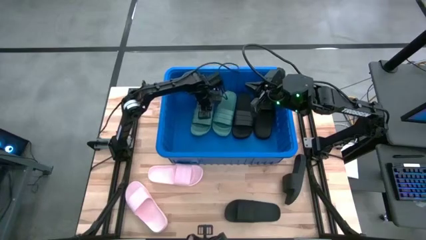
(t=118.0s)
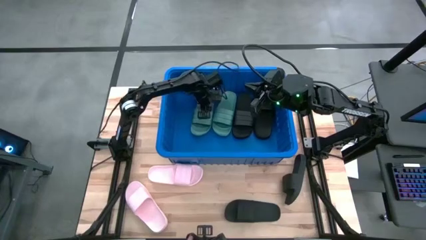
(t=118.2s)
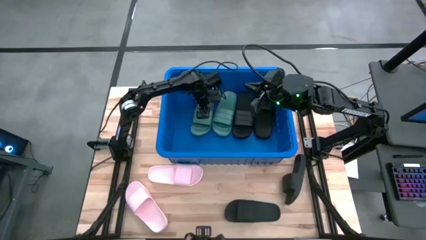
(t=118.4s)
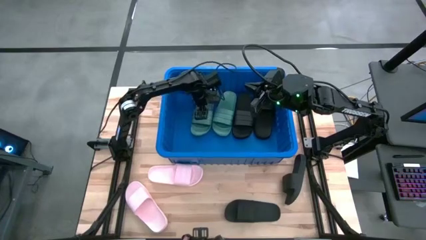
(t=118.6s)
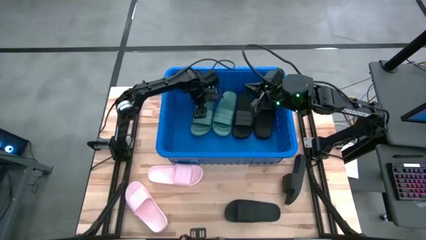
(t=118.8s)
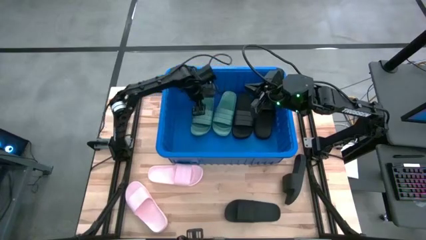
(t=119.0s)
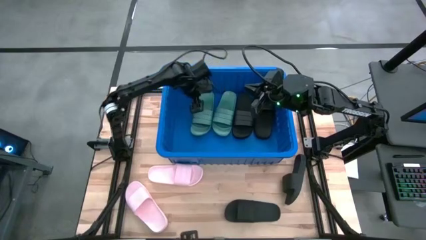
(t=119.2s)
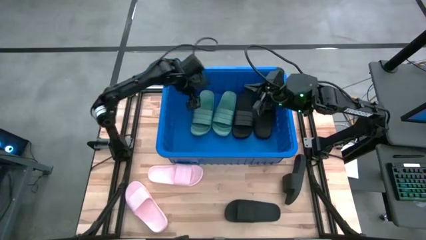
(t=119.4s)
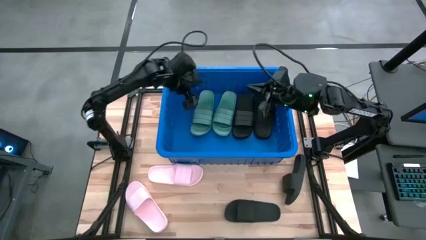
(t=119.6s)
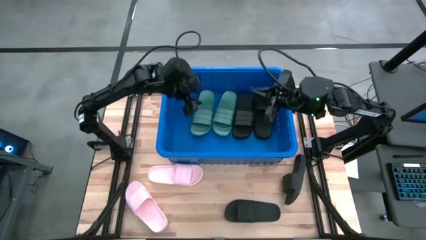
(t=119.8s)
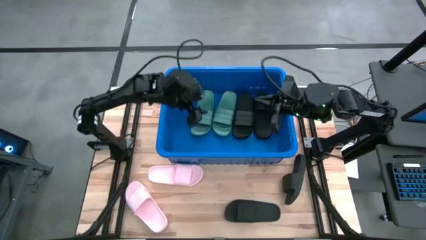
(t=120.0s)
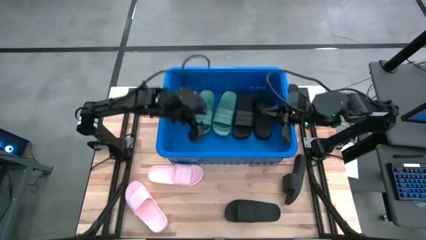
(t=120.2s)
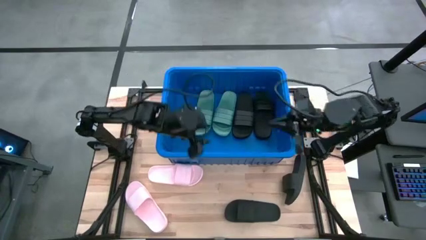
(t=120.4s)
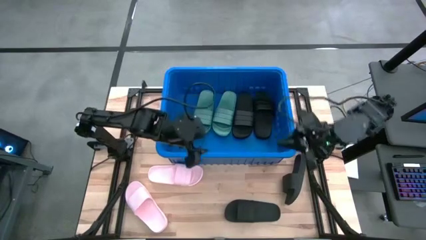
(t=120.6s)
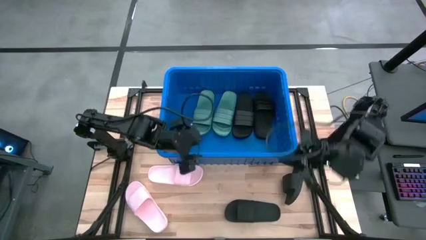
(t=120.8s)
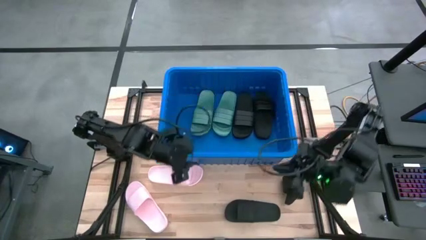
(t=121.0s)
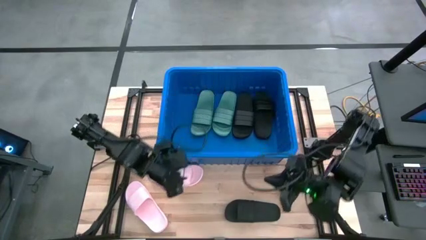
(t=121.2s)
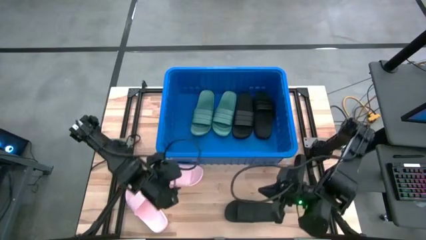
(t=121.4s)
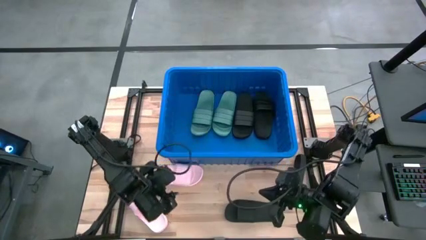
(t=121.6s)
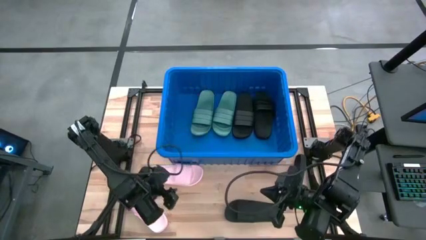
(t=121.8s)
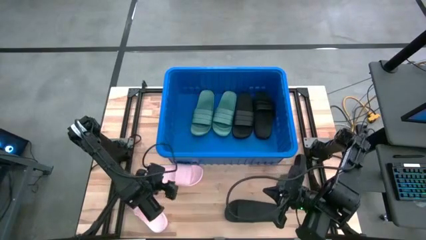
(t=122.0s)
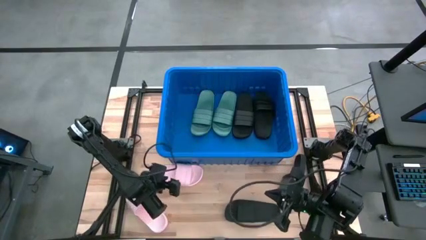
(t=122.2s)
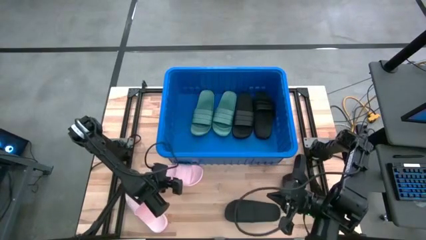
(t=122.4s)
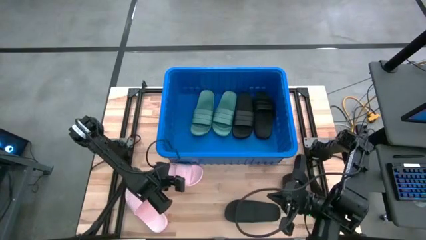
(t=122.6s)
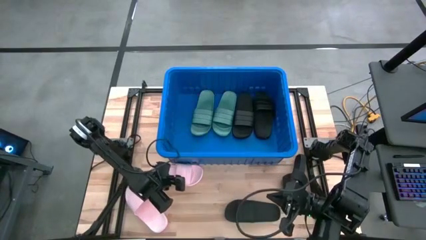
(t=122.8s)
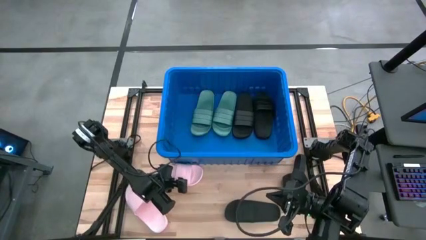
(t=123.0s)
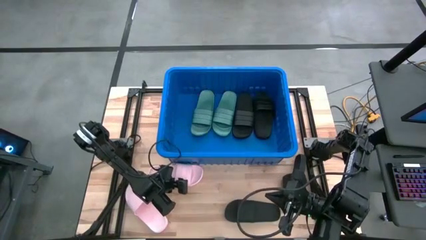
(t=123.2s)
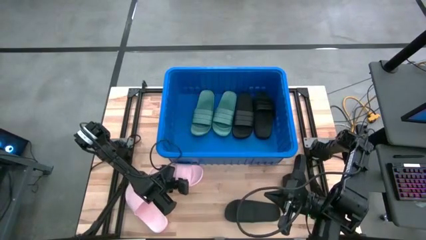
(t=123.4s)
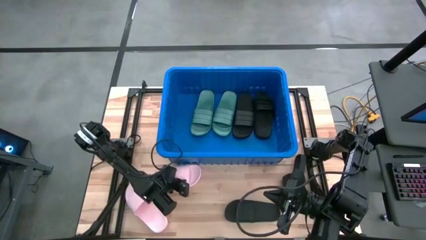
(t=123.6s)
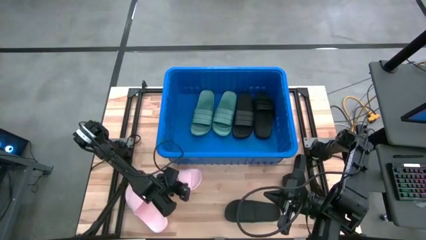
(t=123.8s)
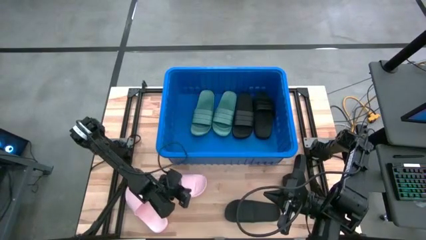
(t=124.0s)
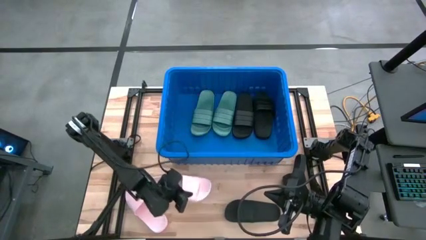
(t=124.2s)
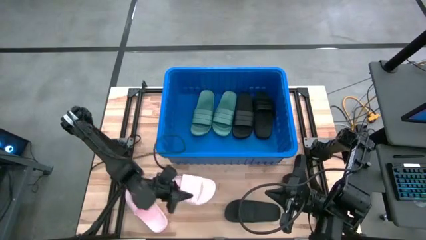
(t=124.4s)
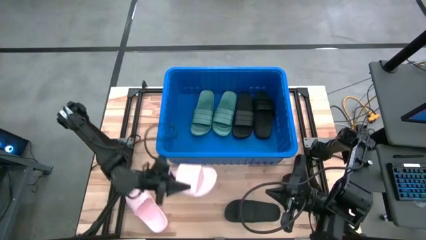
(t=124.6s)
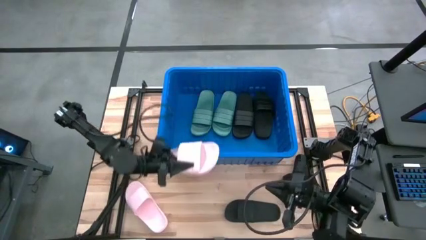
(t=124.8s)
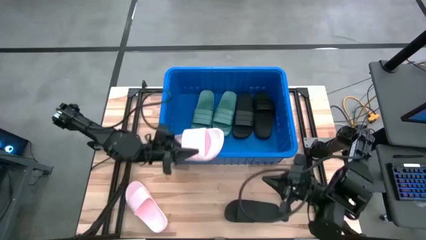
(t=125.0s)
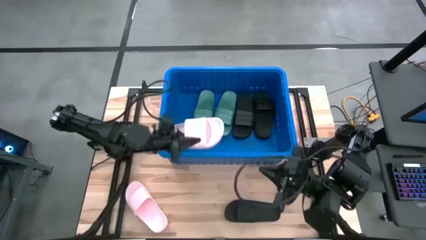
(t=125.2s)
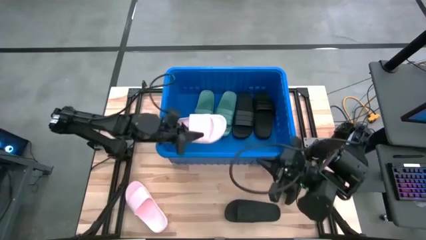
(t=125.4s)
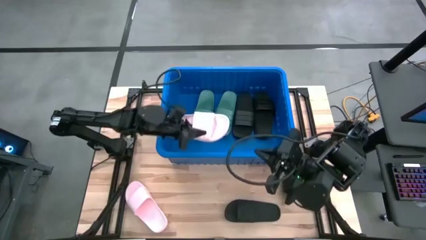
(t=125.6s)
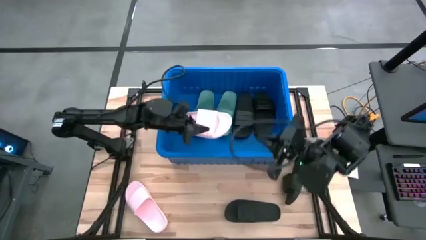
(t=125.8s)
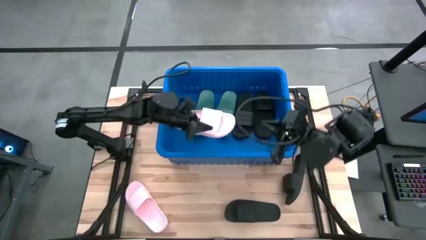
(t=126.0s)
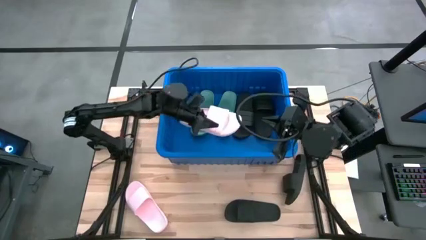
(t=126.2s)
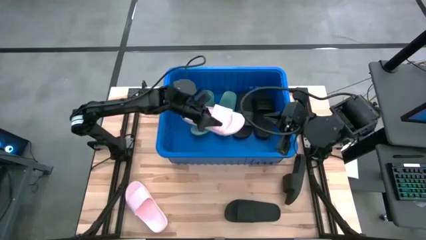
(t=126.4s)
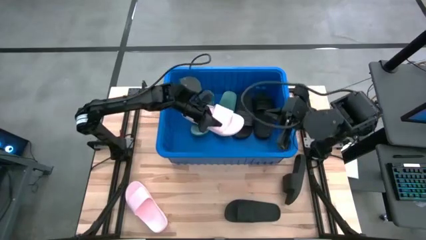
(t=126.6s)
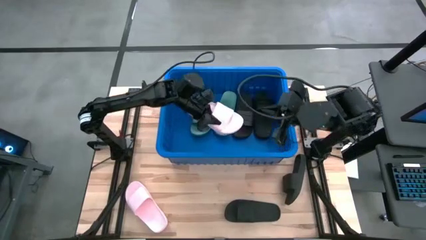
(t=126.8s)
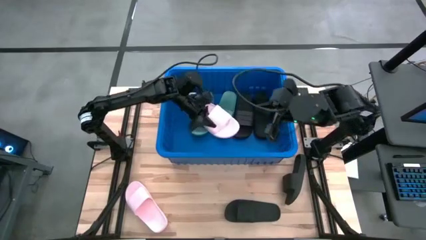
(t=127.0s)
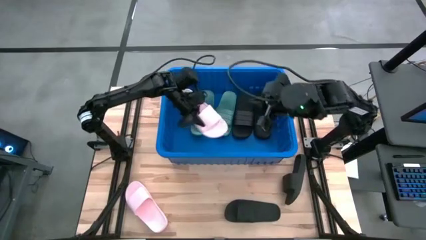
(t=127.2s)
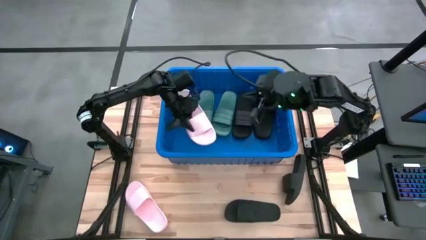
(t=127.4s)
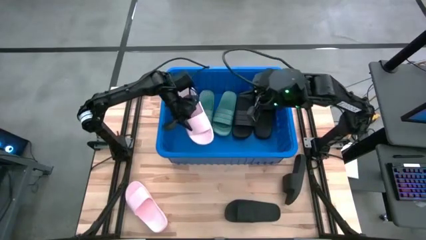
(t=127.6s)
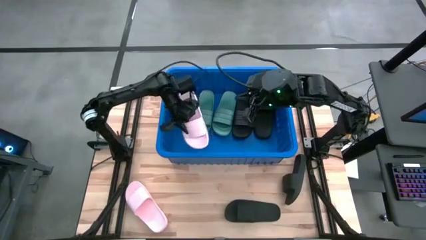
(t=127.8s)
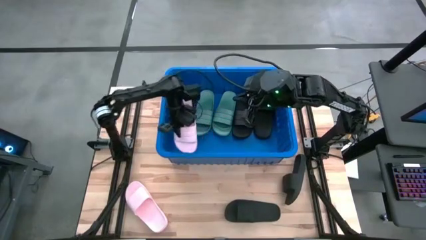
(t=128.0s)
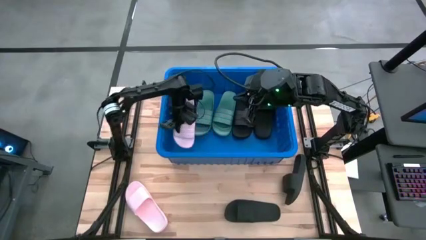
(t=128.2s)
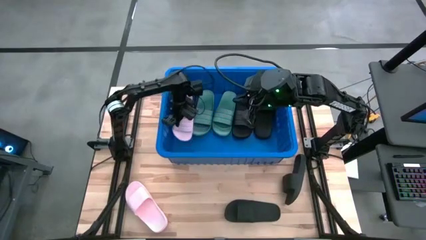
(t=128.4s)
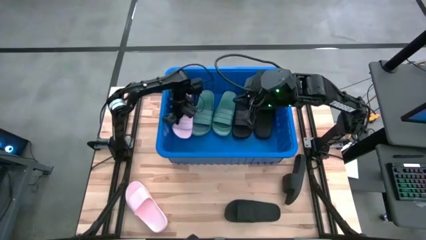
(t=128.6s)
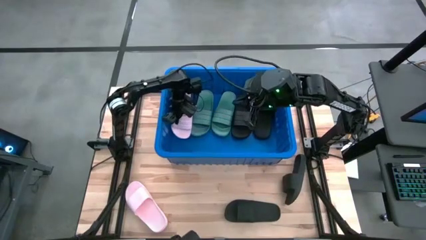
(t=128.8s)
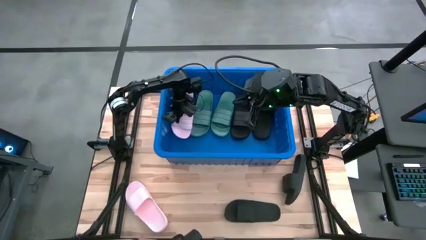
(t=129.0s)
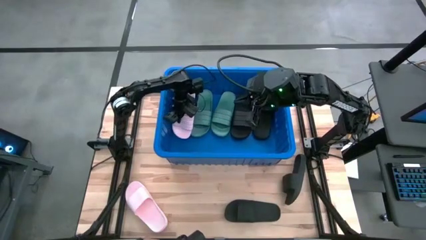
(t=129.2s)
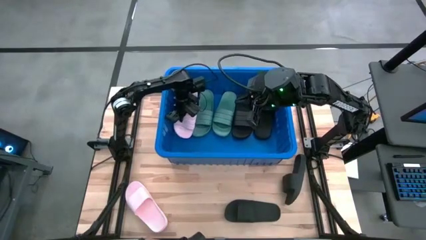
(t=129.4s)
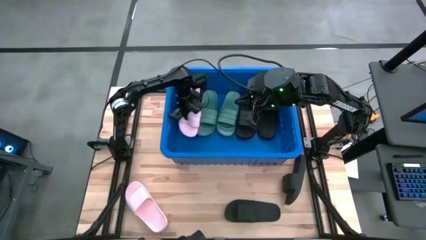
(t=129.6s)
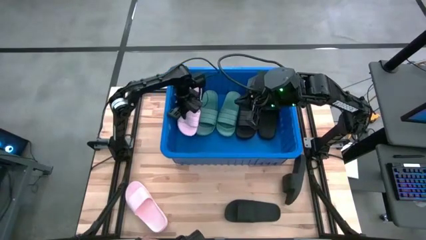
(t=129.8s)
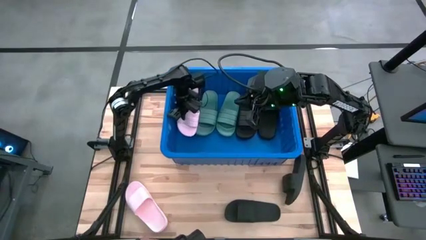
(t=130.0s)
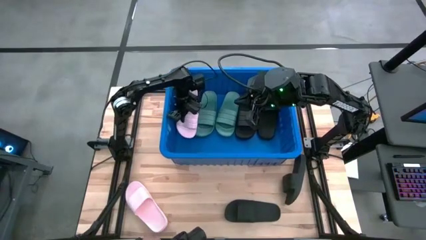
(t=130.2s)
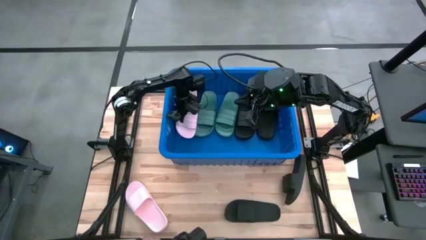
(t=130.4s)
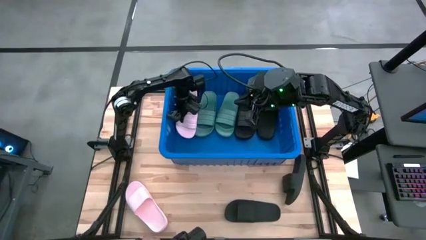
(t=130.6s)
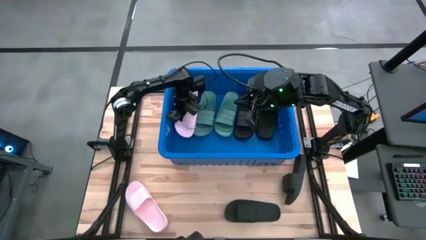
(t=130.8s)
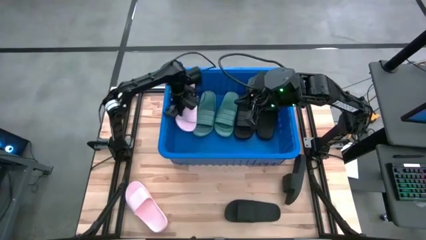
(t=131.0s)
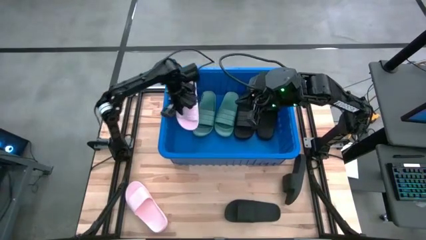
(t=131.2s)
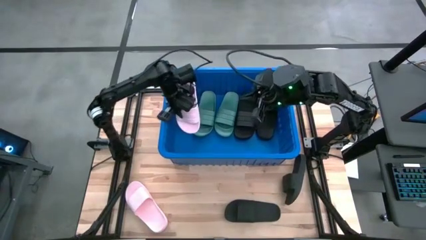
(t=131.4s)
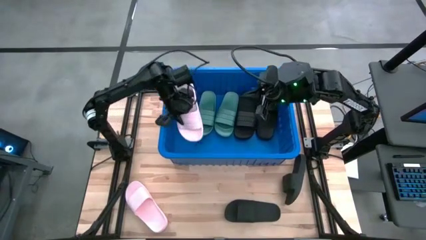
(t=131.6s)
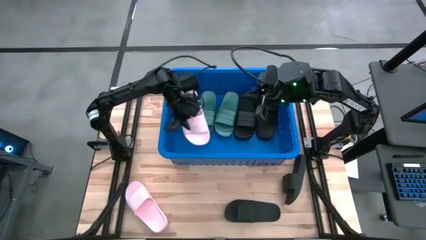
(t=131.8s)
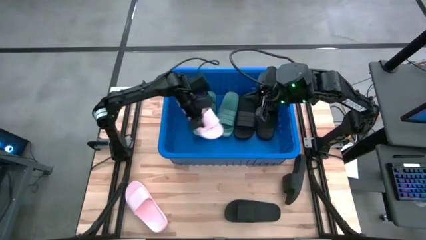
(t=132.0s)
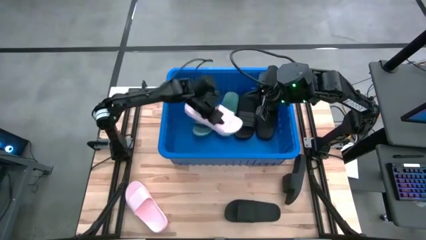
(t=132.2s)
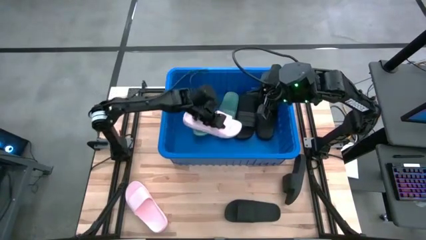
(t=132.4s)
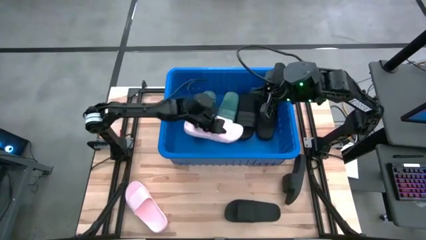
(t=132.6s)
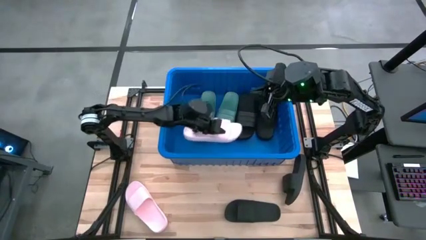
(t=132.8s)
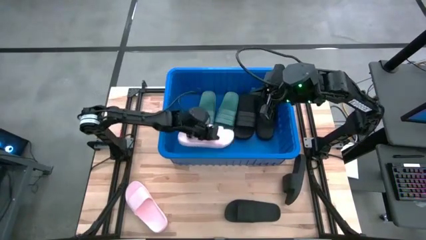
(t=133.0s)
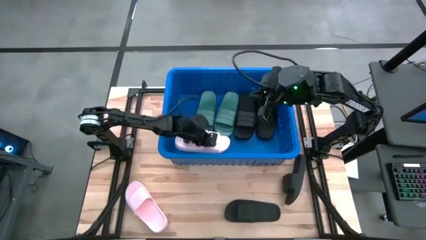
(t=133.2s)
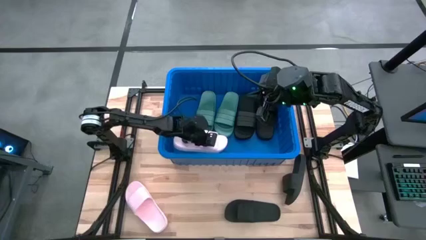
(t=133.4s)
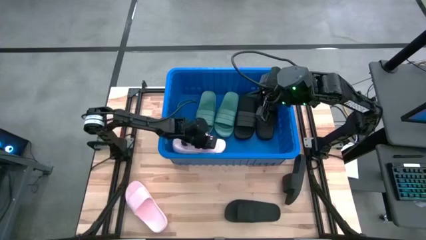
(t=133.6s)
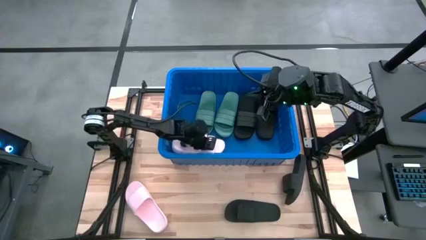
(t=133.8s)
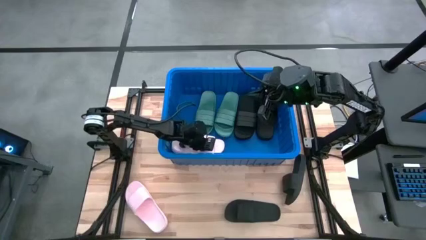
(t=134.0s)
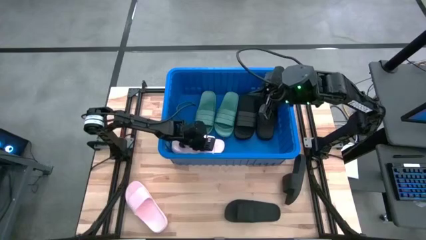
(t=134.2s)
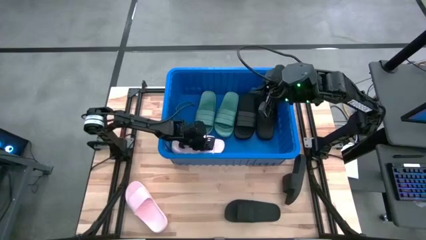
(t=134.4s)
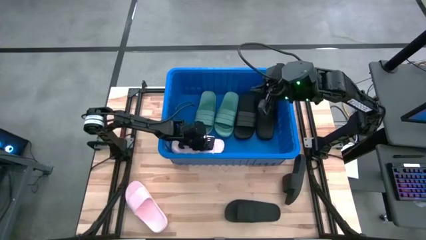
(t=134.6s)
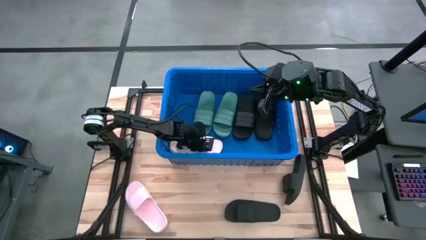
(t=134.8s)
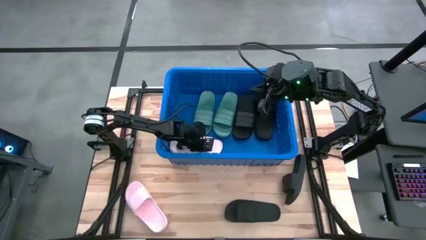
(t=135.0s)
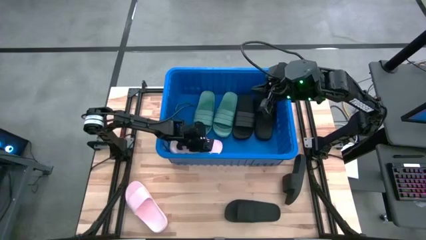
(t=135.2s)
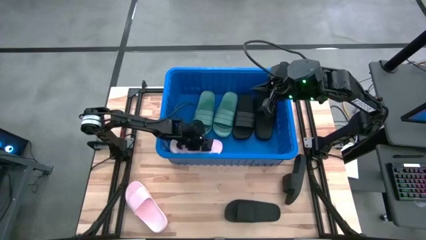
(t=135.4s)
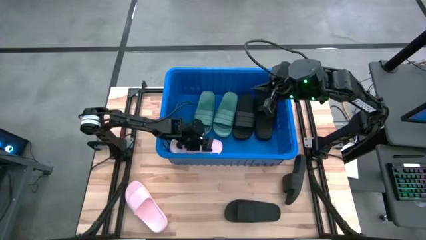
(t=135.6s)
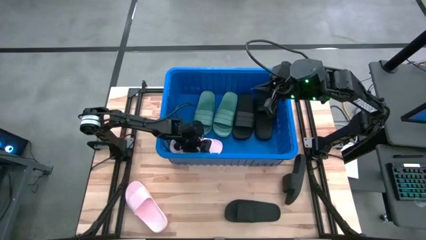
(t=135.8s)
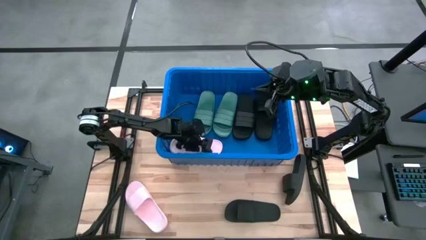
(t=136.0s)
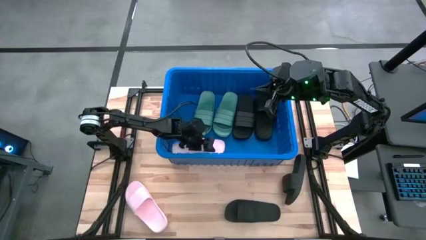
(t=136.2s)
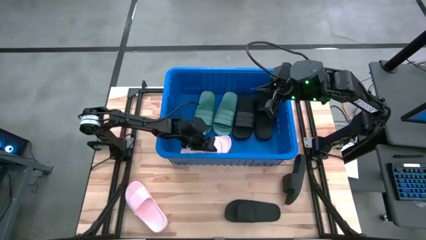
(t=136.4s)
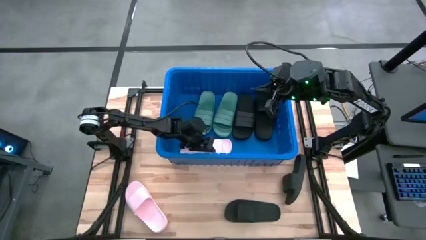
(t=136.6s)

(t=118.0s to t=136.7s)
Task: Pick and place slides into bin
Put the pink slipper into the blue bin
